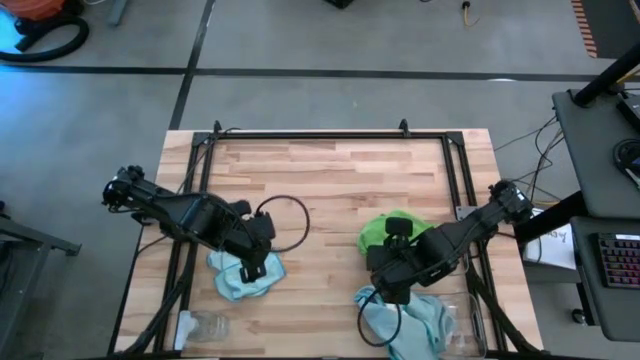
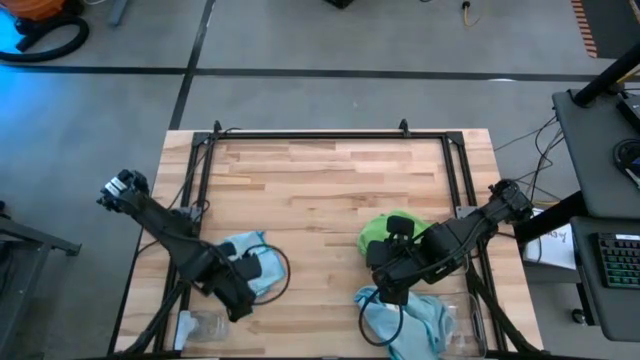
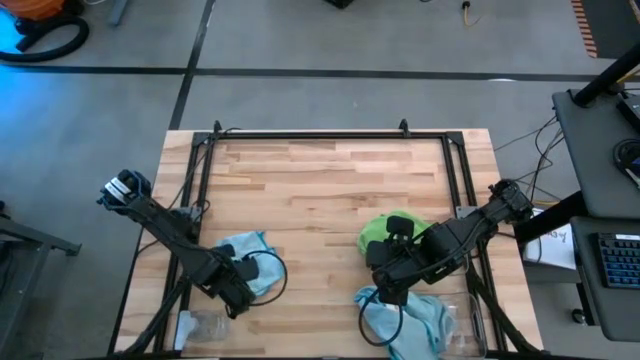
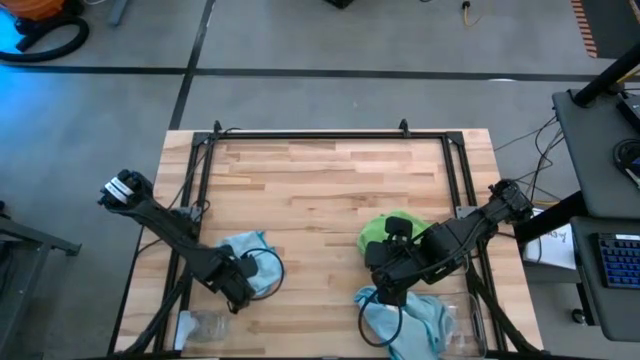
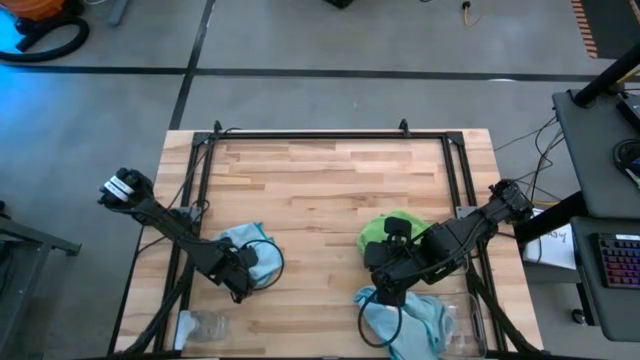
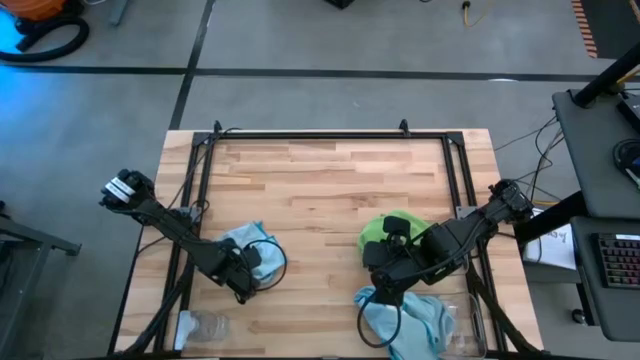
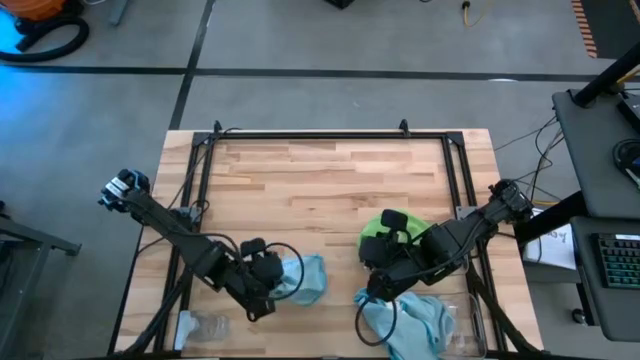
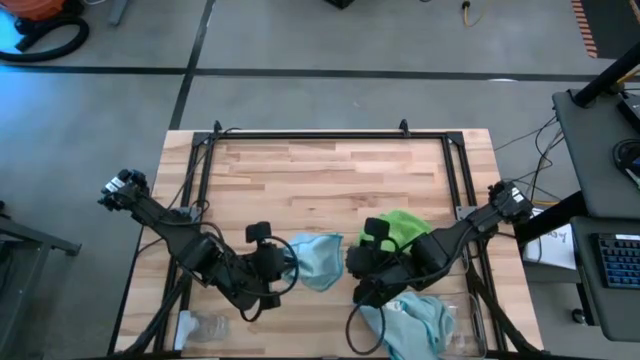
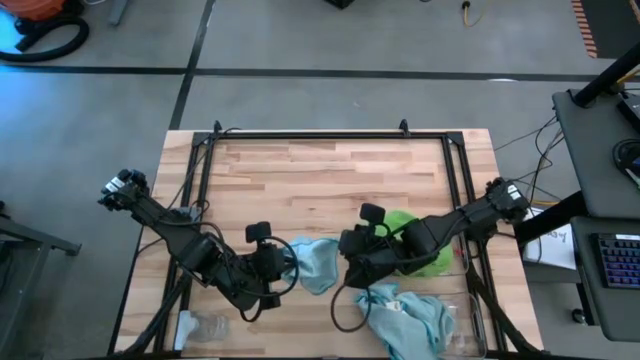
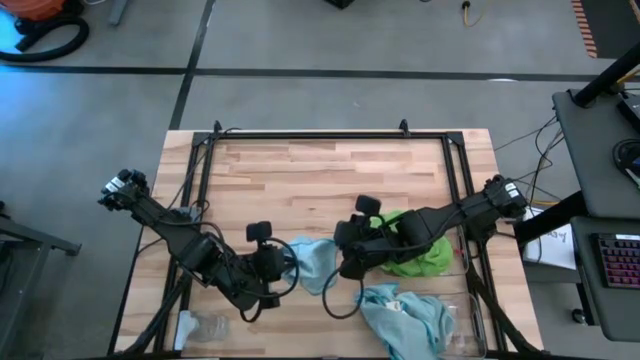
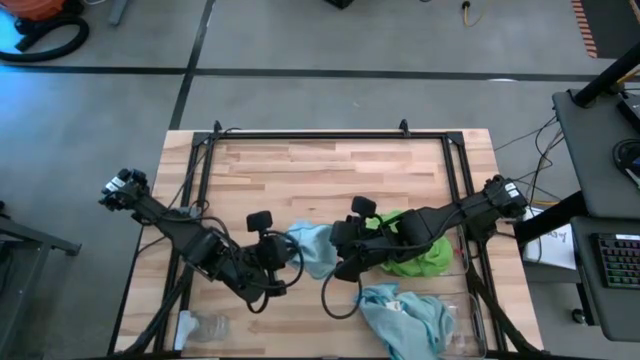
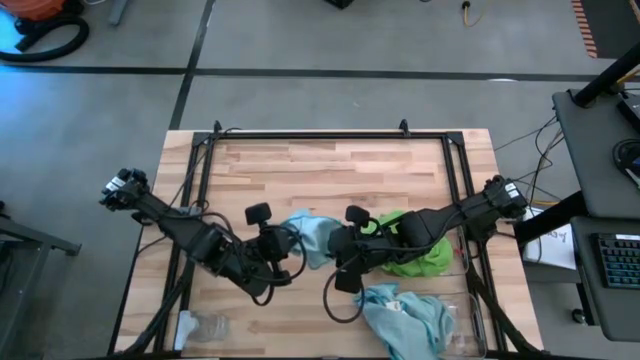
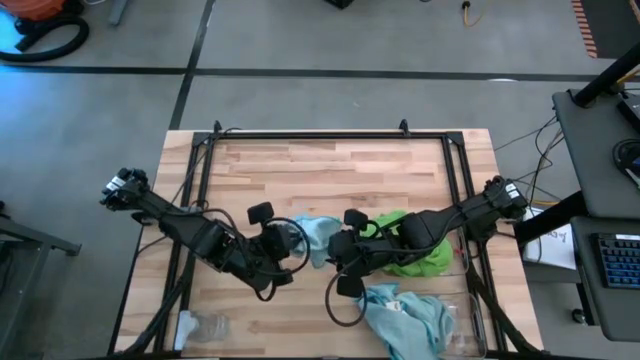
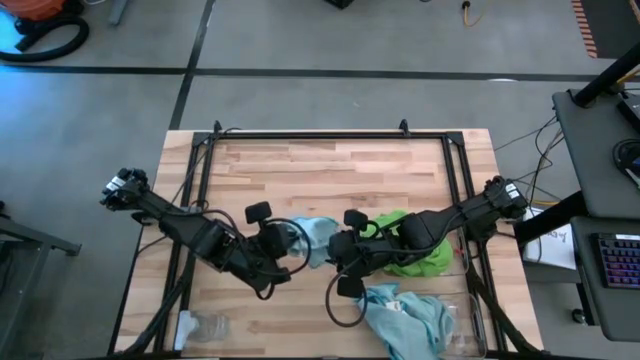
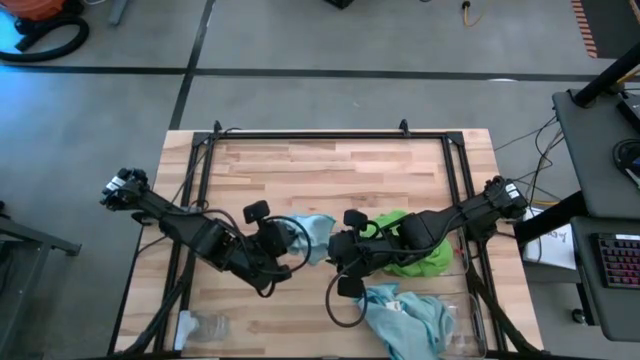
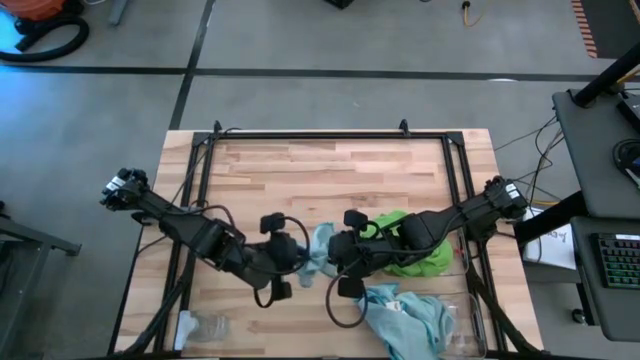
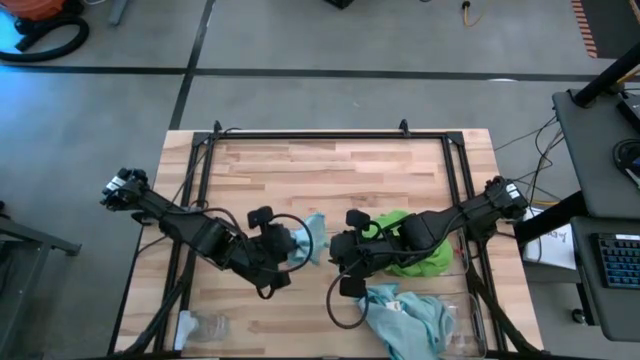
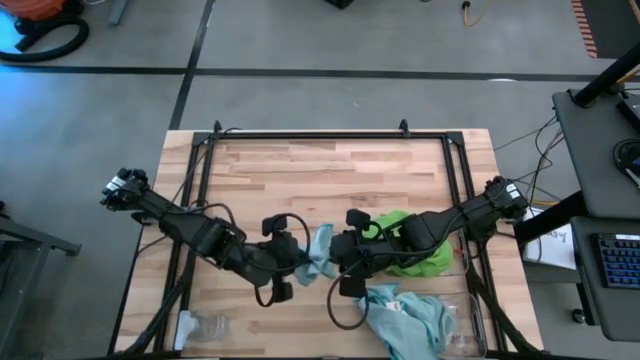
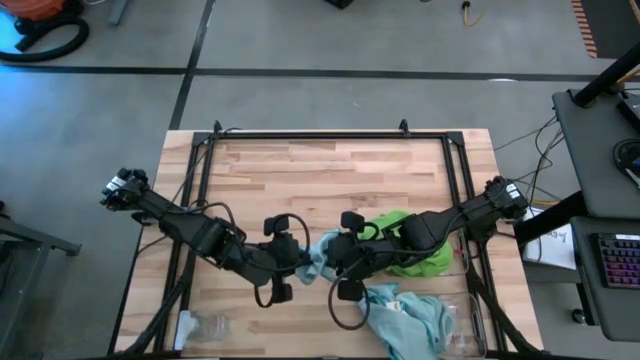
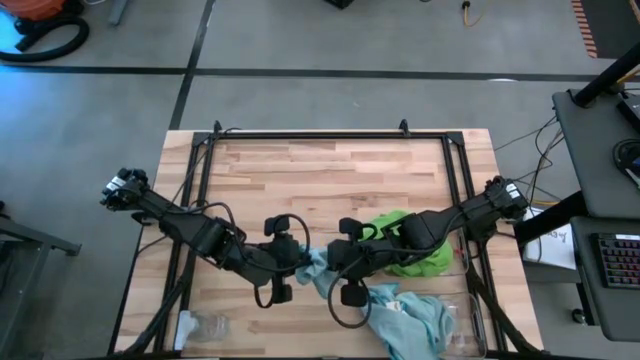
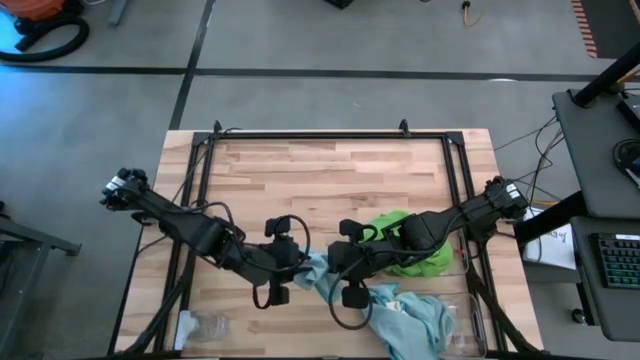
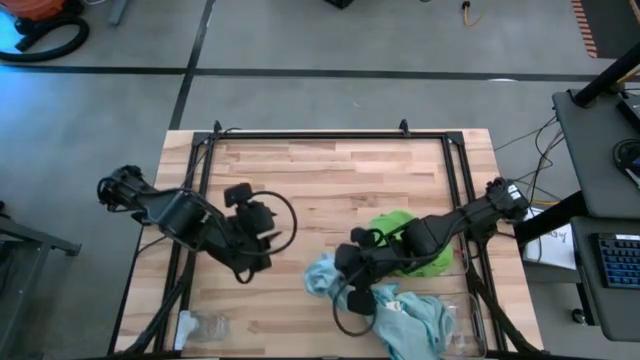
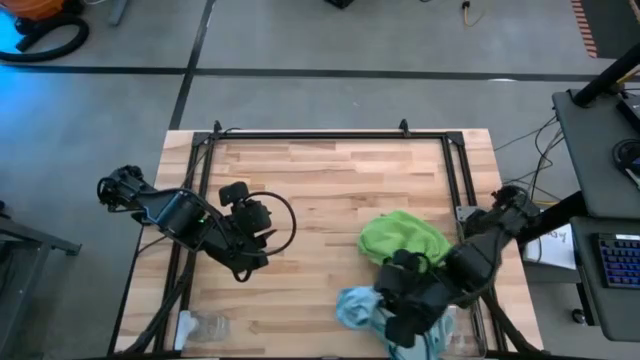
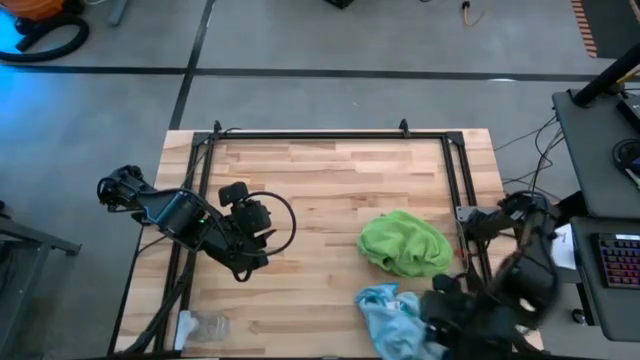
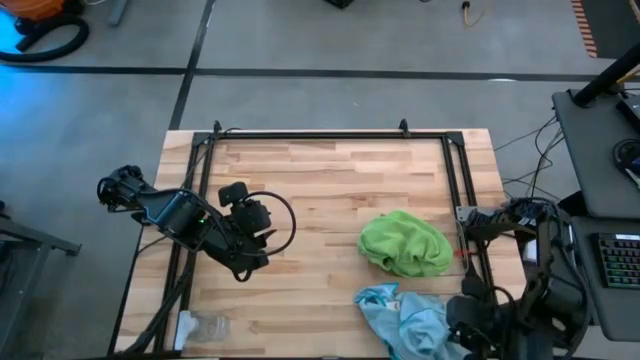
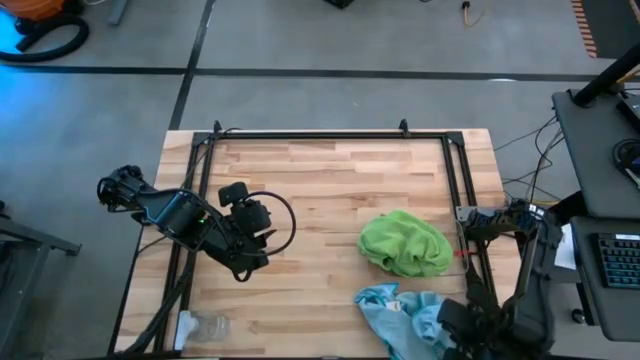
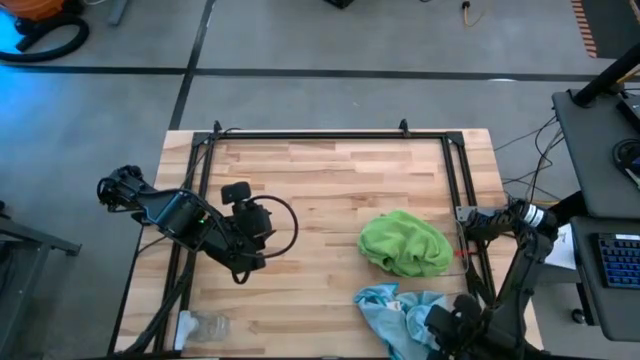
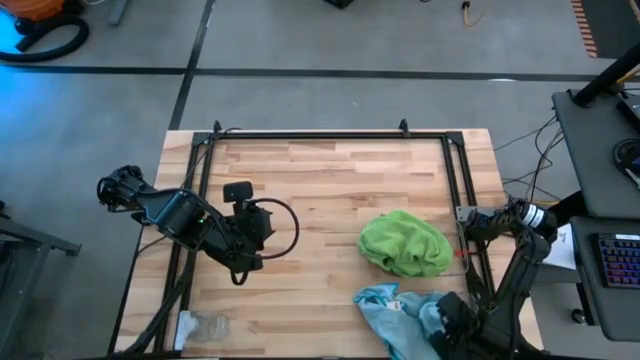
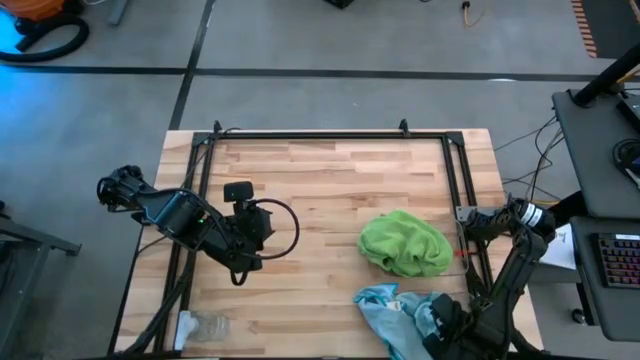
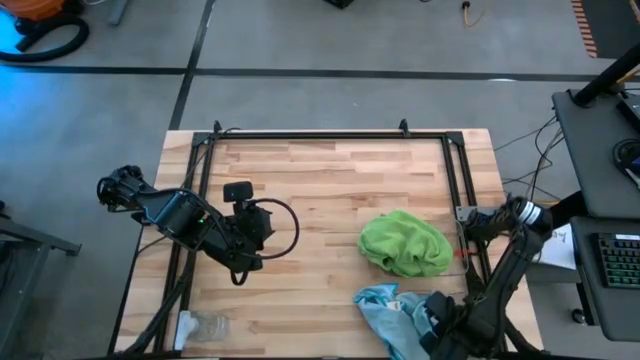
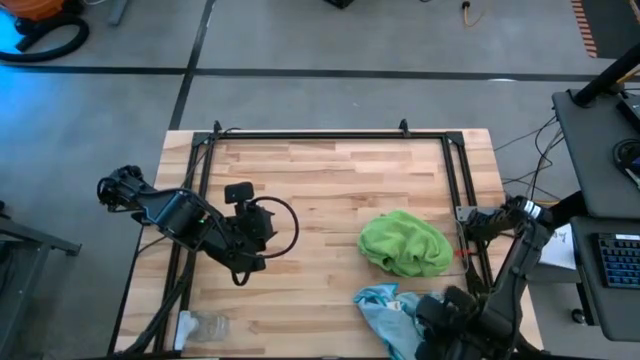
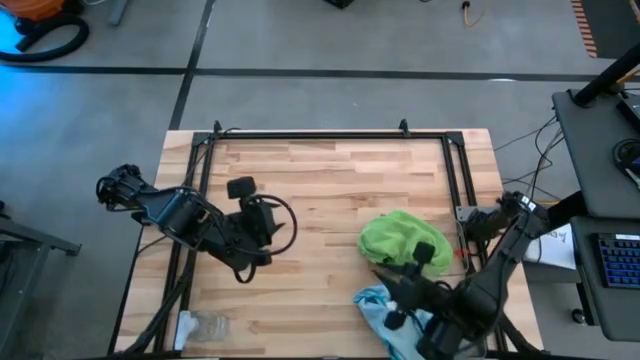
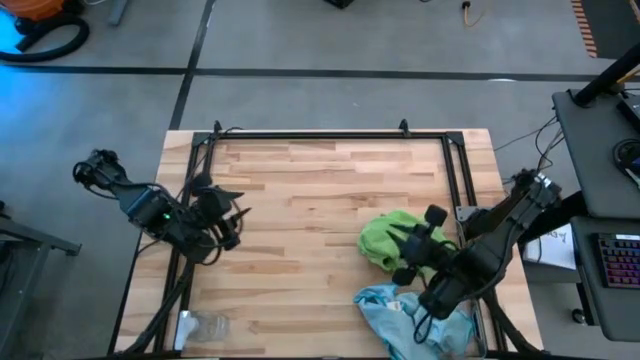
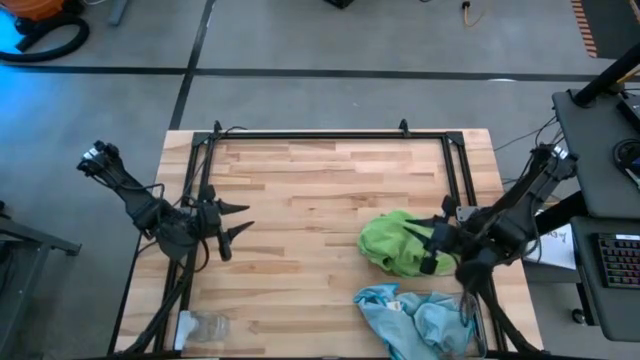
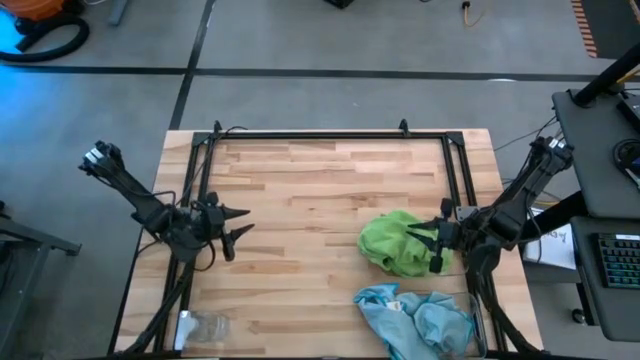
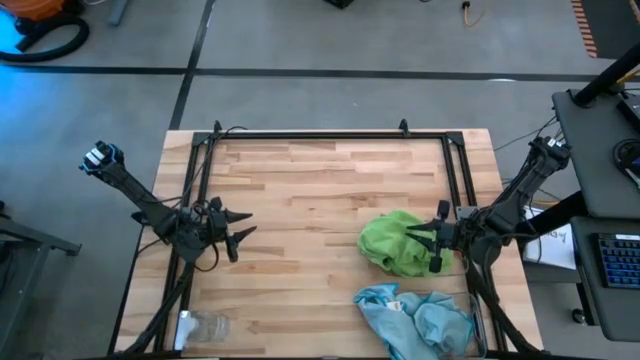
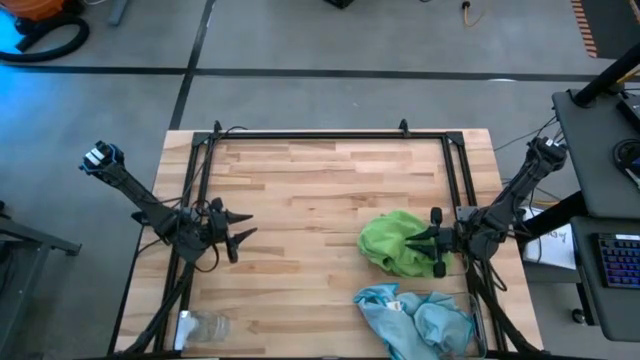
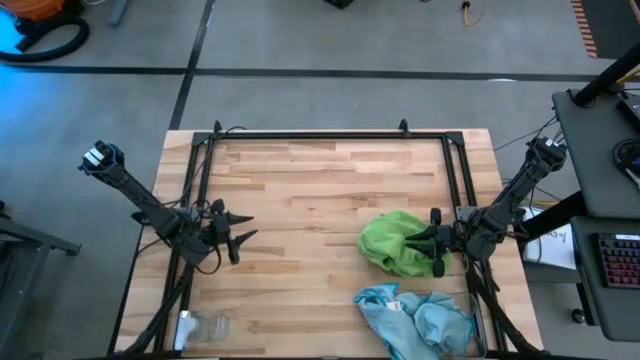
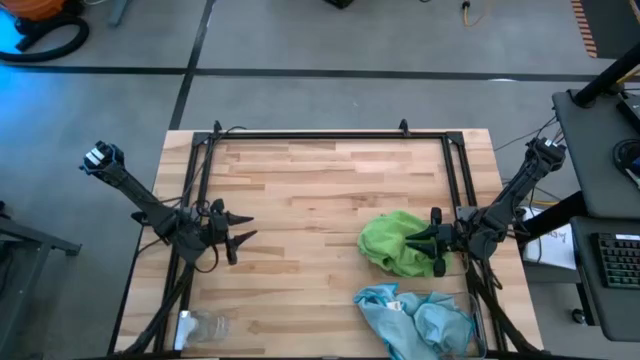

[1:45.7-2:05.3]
Task: Sort microfiber towel by color & place in baskets
Put the blue microfiber cloth into the bottom transparent bin
